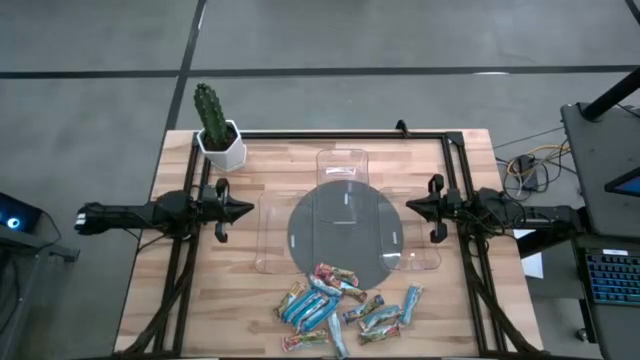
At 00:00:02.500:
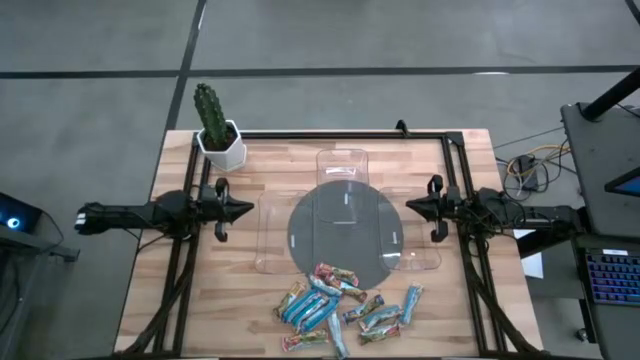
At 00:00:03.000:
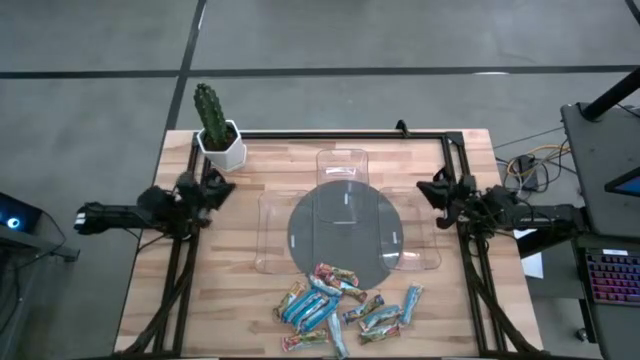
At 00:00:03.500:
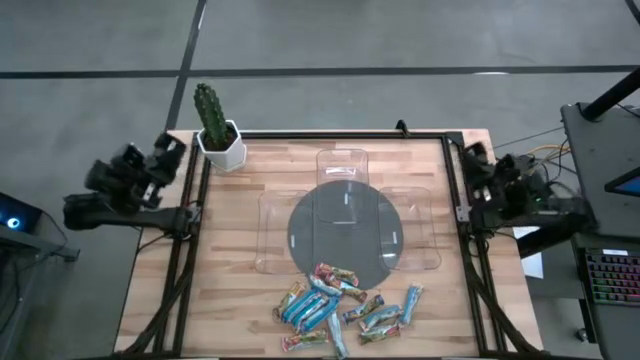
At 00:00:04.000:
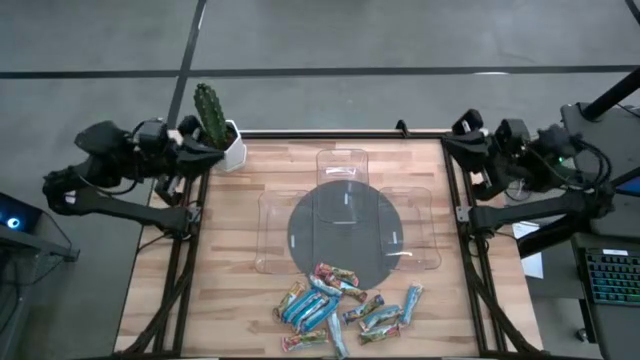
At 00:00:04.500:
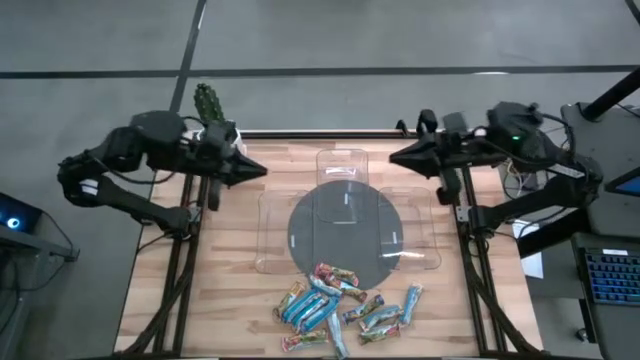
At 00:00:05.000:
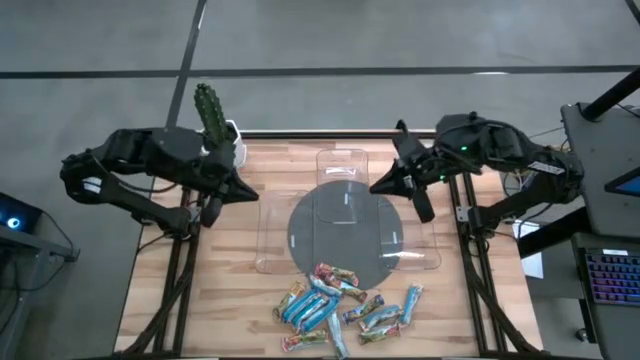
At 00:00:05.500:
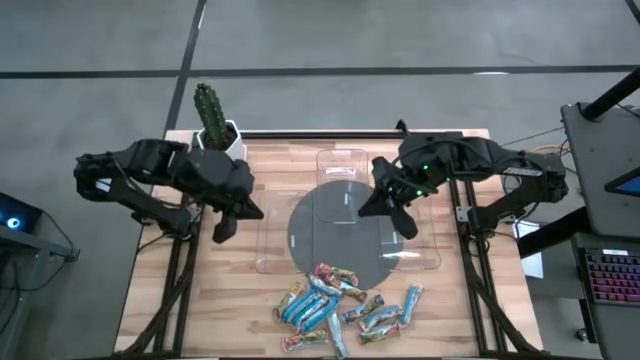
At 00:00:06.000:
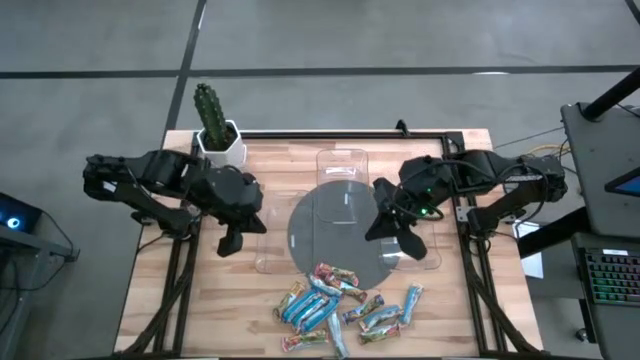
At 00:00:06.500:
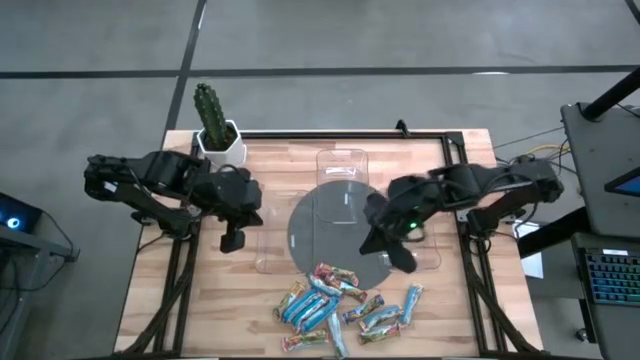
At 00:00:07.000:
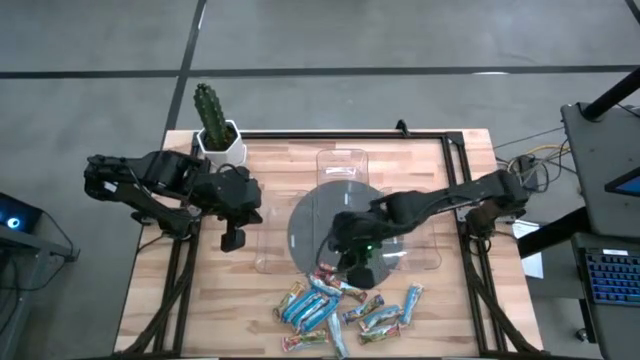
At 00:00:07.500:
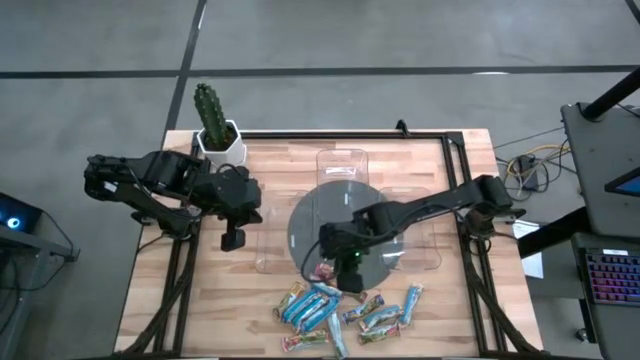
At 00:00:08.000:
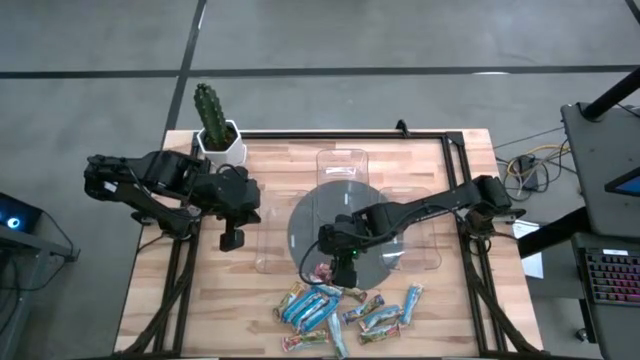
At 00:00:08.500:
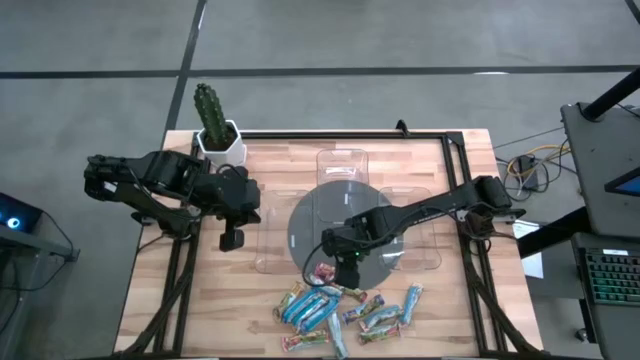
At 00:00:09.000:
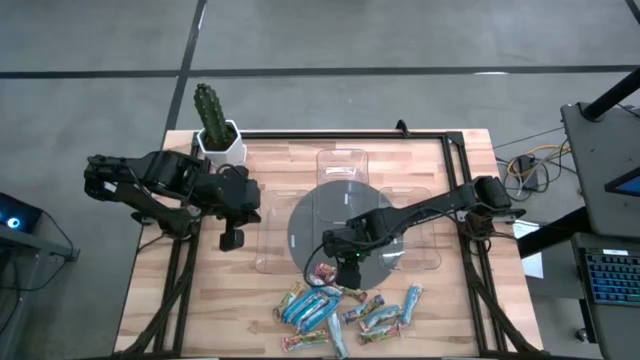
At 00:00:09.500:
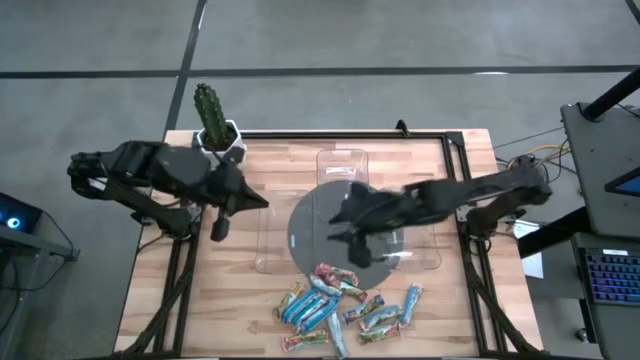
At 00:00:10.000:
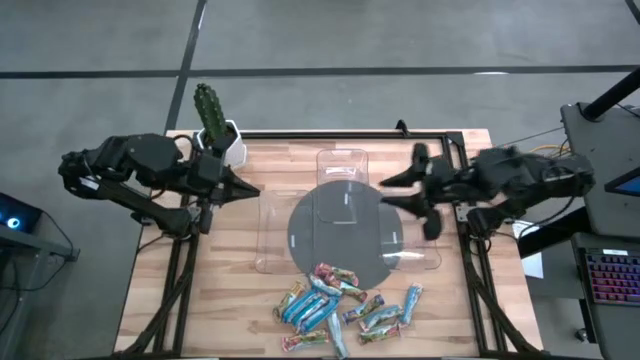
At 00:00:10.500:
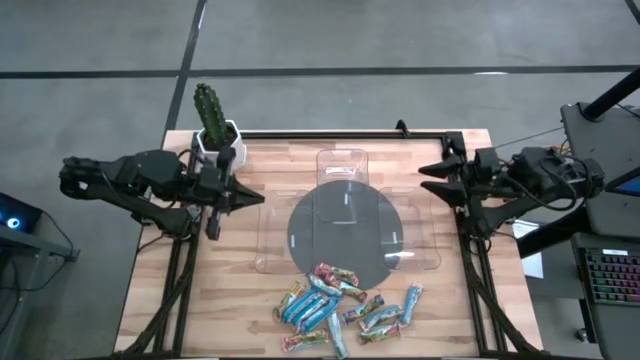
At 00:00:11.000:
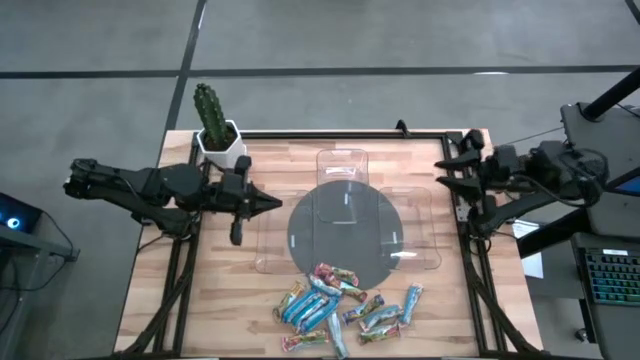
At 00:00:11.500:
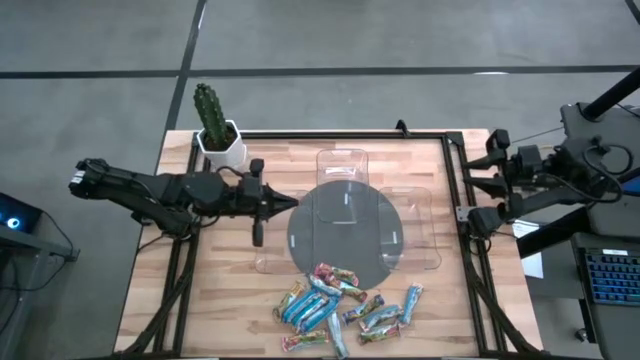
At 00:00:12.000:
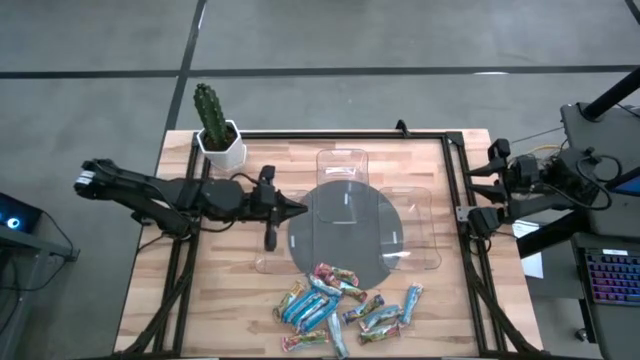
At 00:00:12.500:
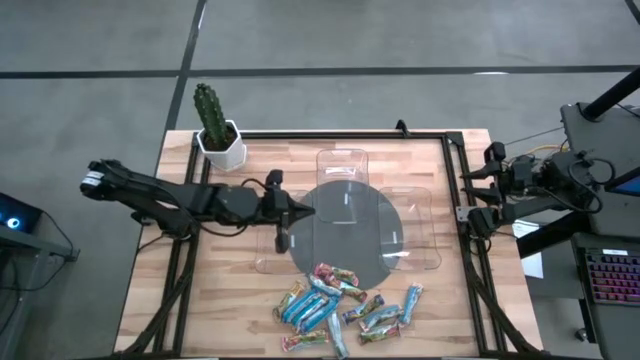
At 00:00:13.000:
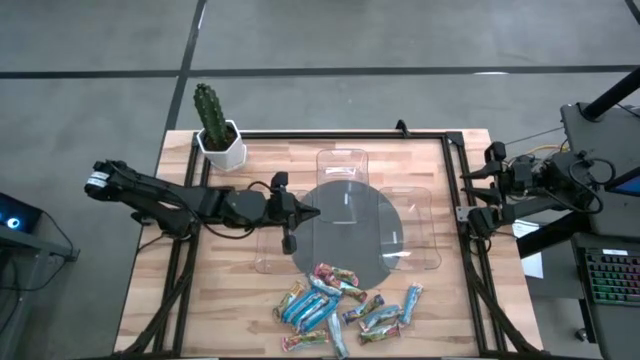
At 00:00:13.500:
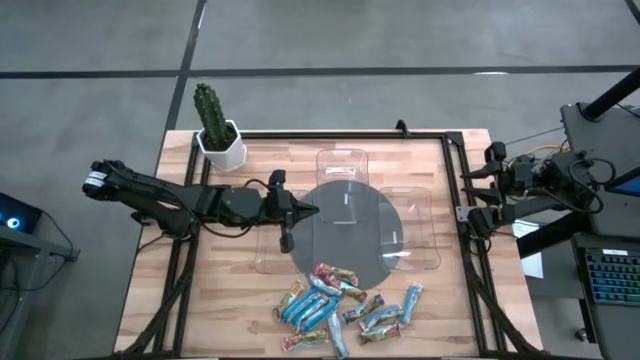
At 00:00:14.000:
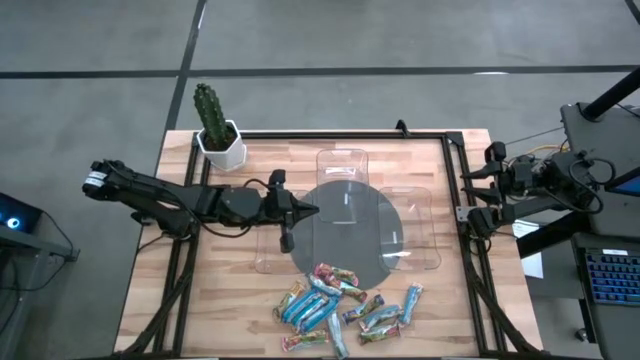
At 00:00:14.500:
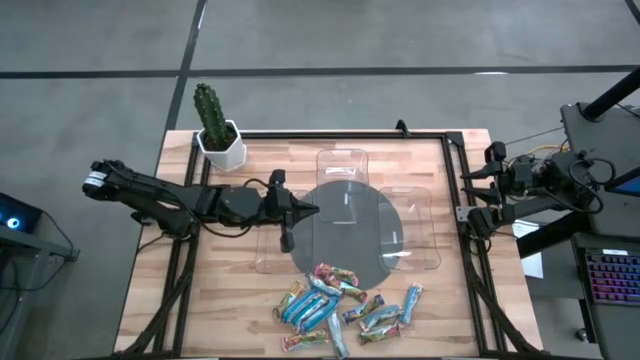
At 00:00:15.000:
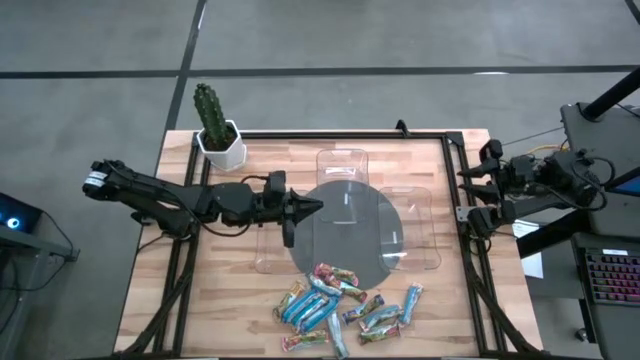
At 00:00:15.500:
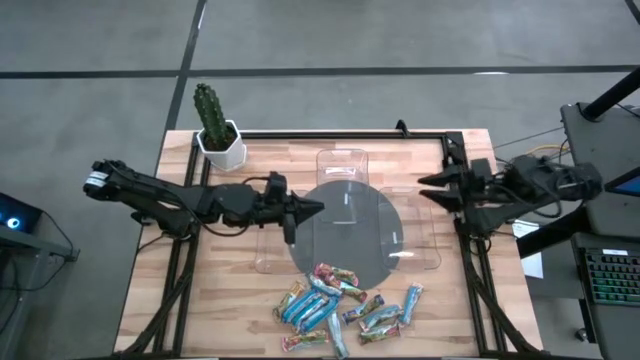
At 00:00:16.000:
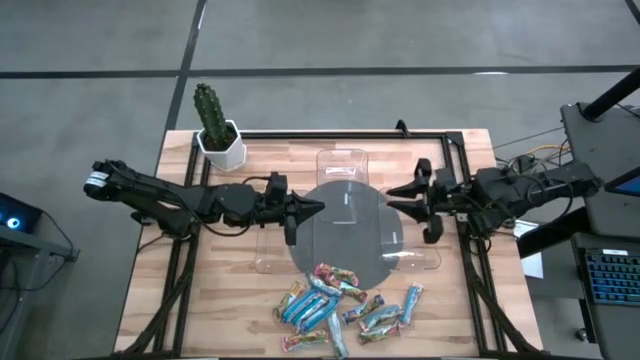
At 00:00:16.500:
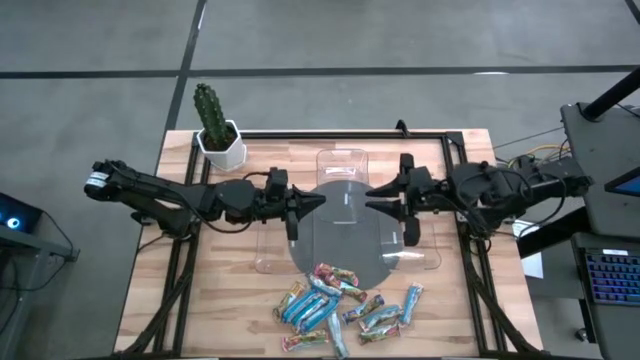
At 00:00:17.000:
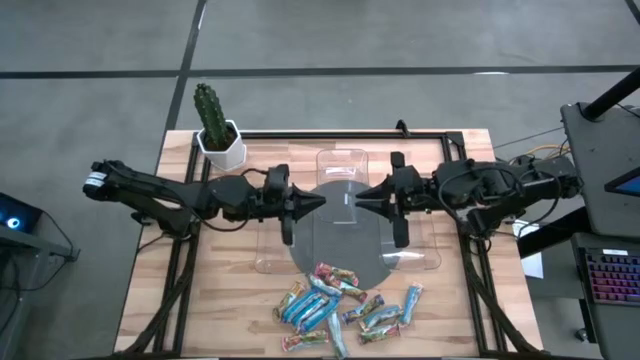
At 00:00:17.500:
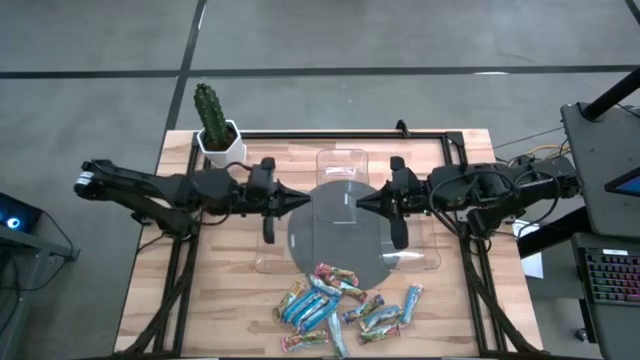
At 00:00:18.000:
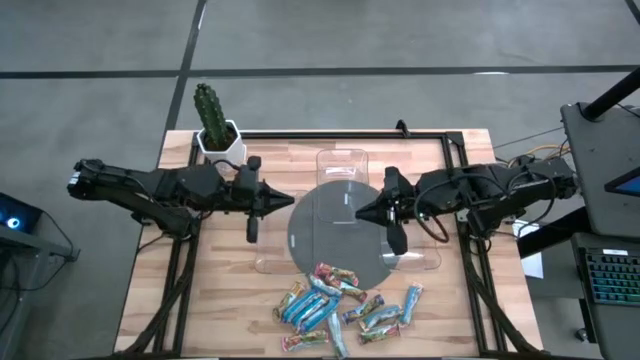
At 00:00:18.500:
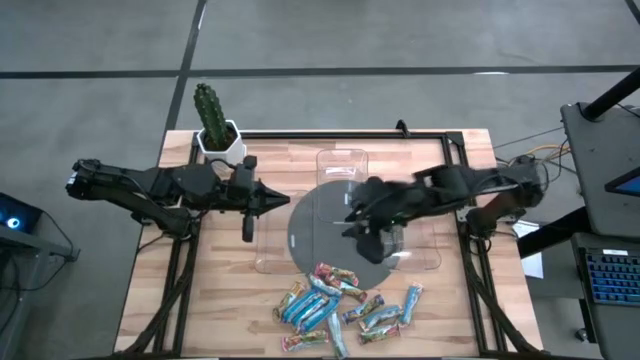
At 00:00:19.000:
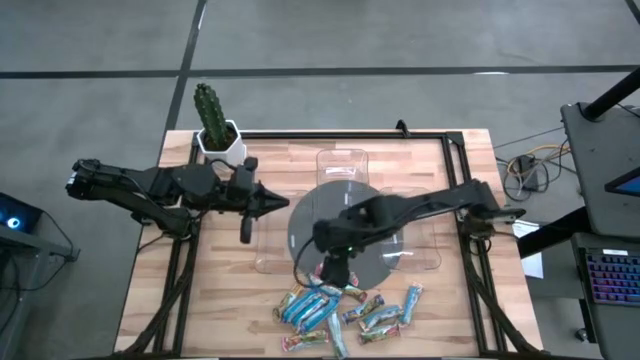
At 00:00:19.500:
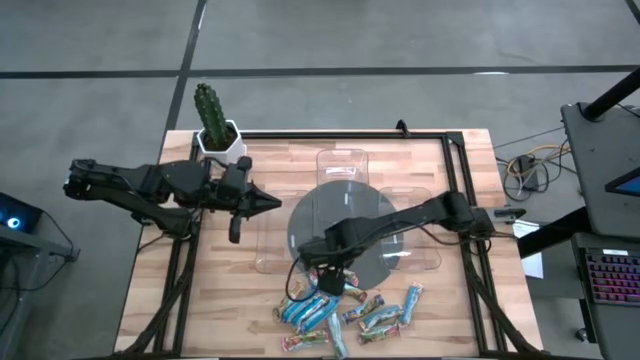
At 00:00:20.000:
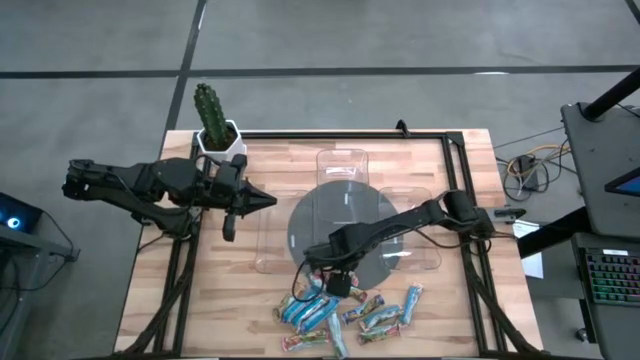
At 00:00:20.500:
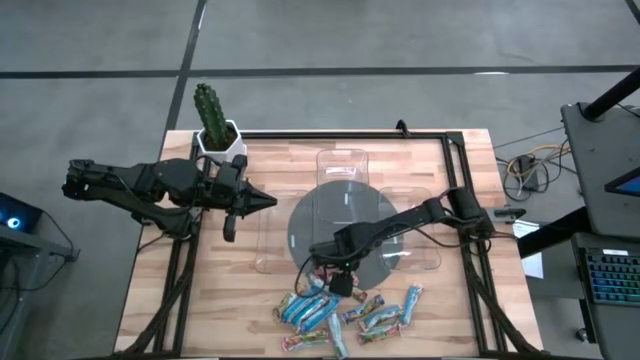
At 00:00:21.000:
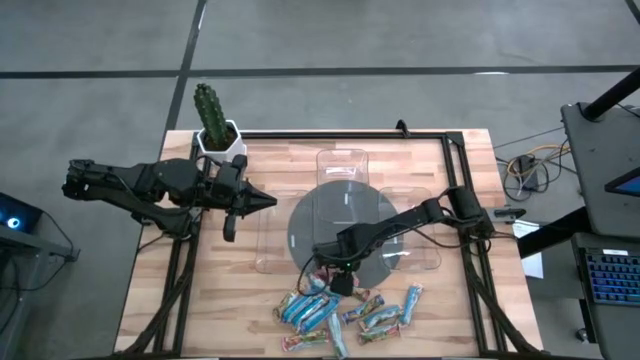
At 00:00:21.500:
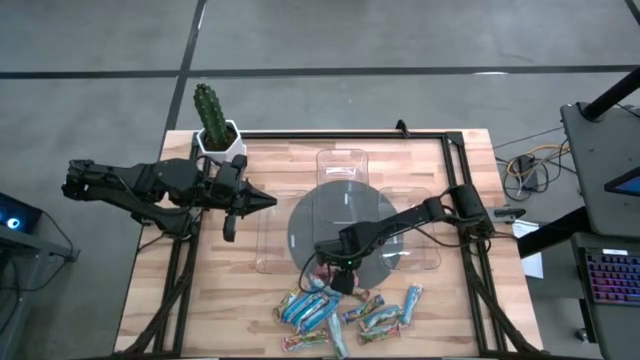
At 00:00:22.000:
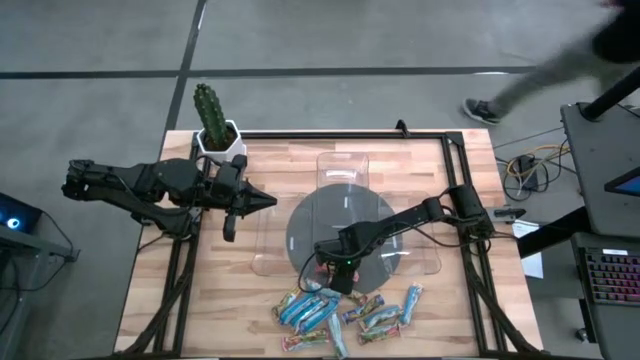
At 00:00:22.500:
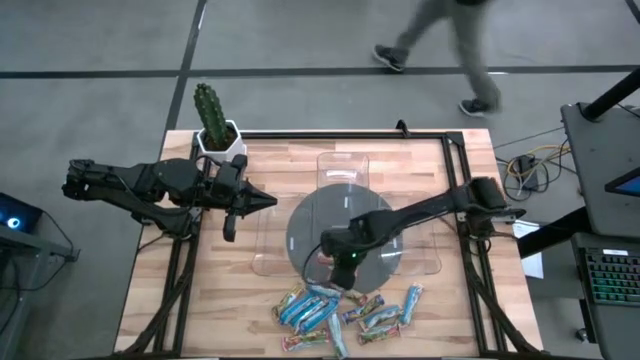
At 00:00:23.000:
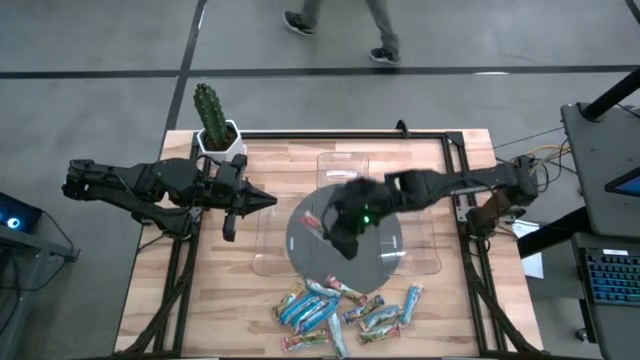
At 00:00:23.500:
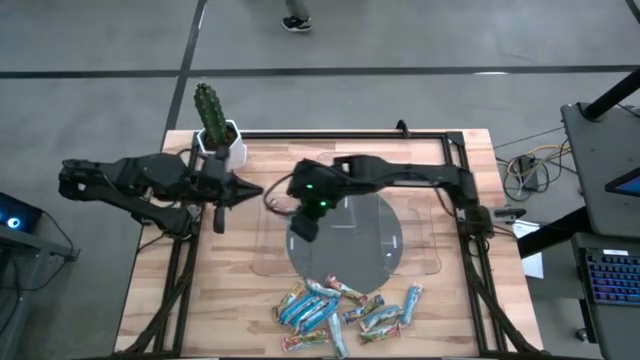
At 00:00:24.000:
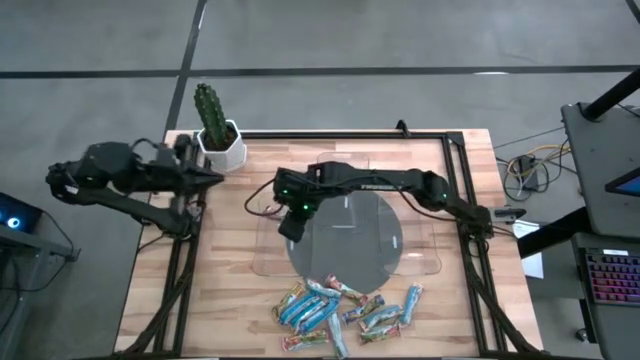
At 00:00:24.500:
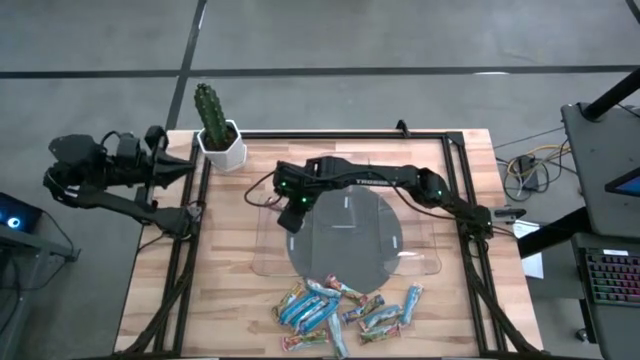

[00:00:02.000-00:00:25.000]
Task: Pick and place Granola Bars by type
Put the red granola bar into the left transparent bin
